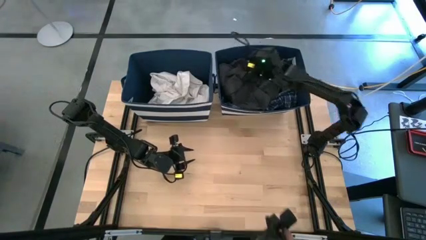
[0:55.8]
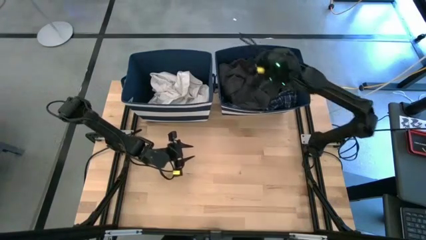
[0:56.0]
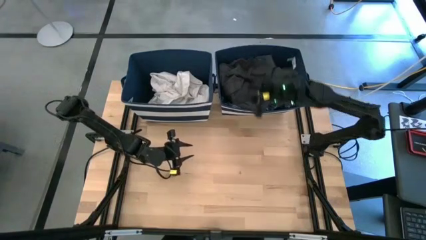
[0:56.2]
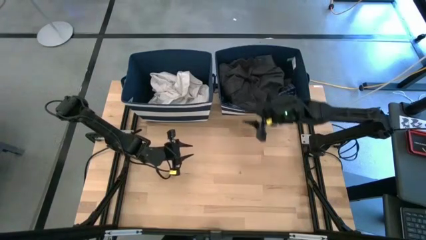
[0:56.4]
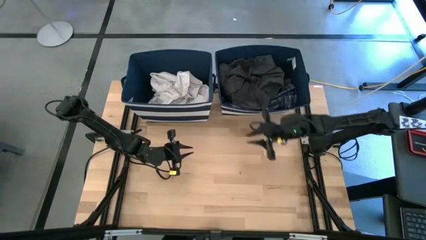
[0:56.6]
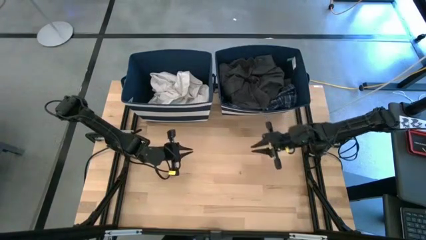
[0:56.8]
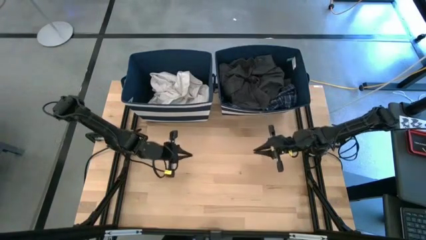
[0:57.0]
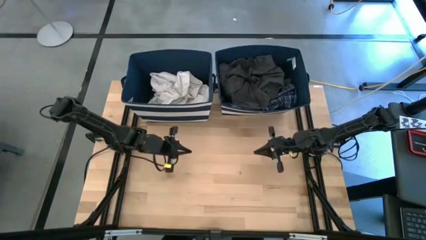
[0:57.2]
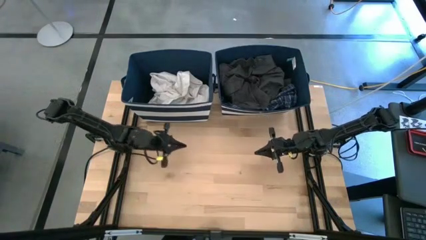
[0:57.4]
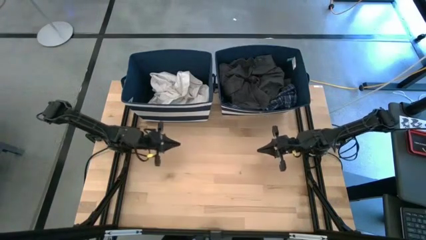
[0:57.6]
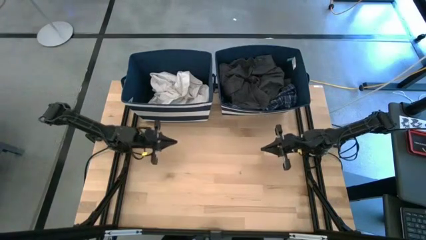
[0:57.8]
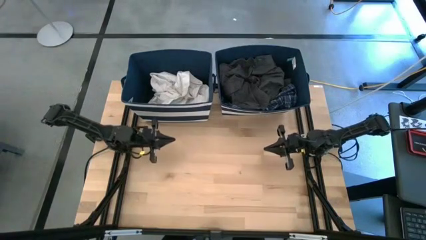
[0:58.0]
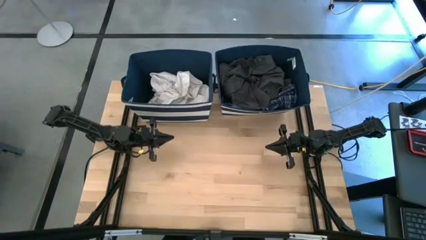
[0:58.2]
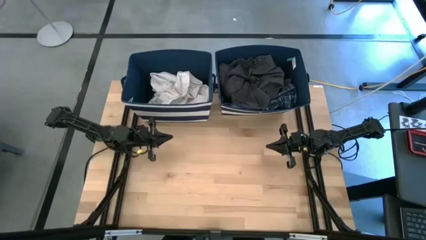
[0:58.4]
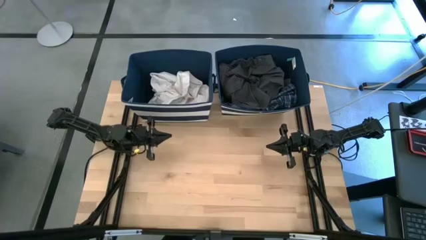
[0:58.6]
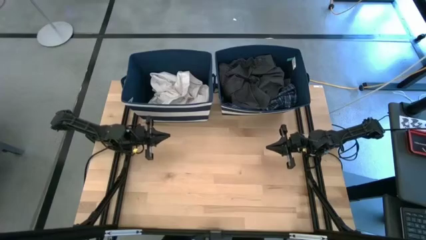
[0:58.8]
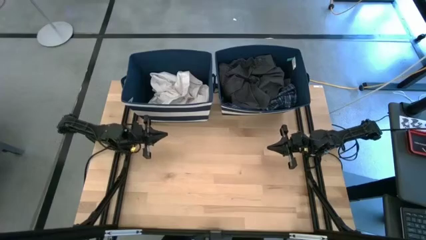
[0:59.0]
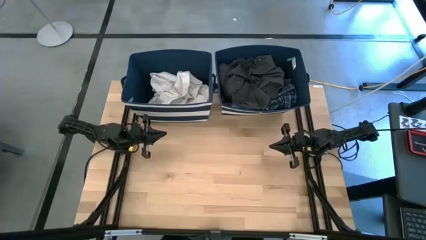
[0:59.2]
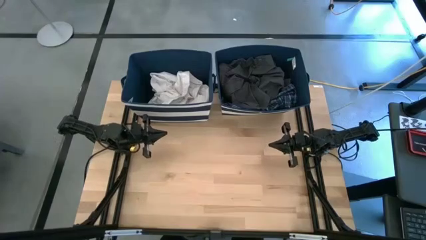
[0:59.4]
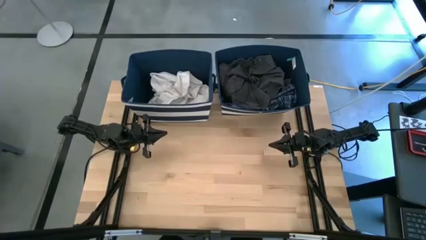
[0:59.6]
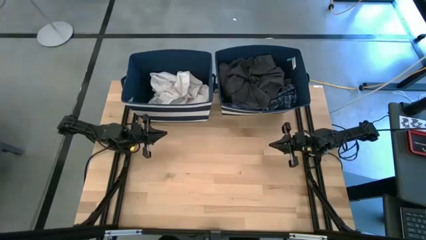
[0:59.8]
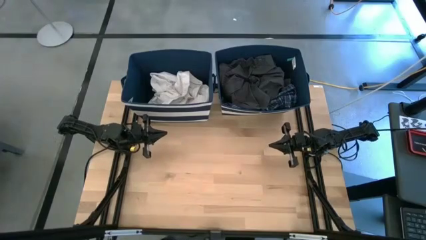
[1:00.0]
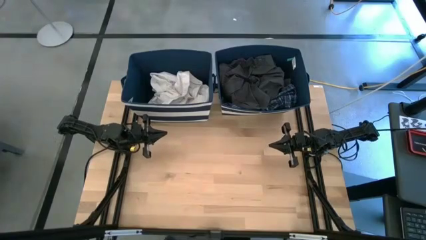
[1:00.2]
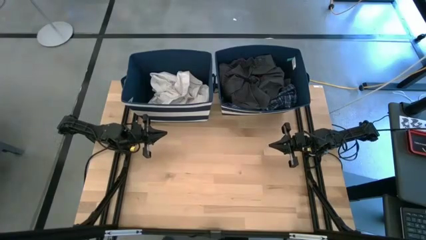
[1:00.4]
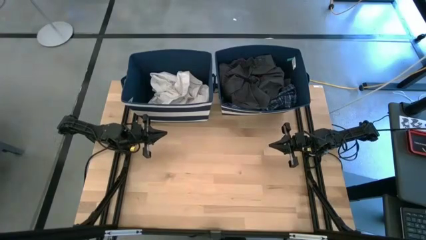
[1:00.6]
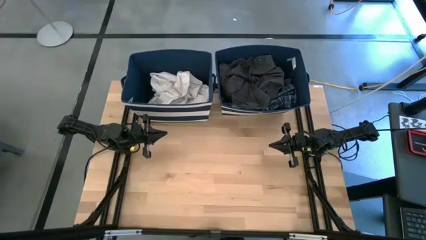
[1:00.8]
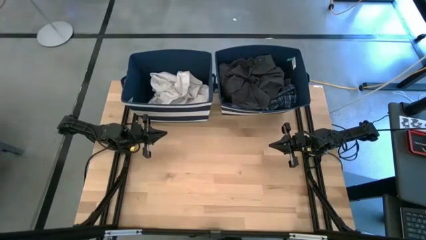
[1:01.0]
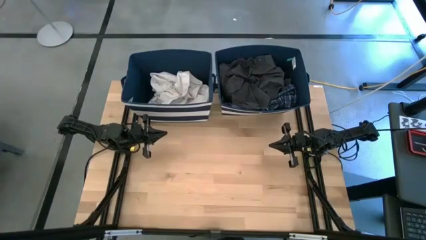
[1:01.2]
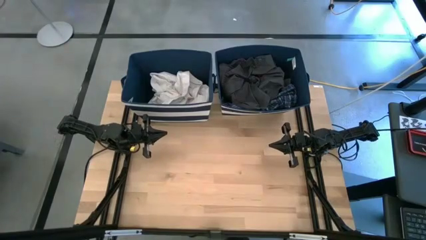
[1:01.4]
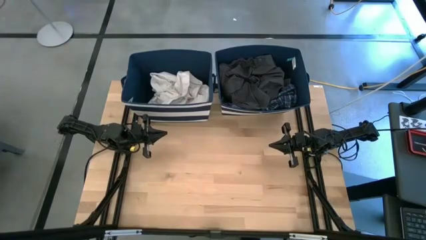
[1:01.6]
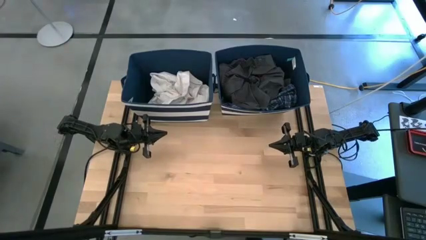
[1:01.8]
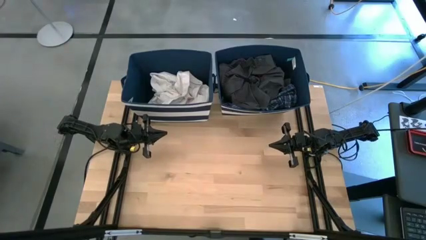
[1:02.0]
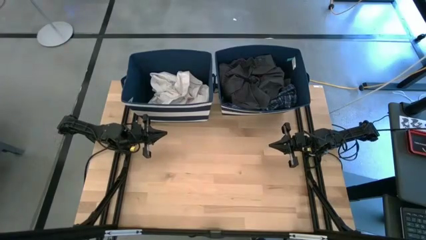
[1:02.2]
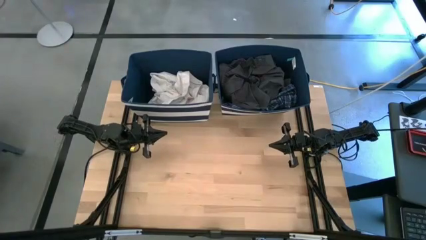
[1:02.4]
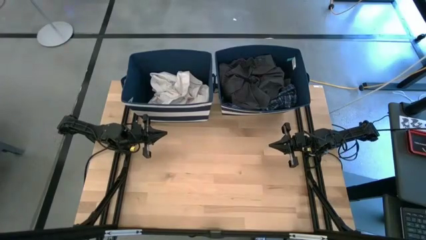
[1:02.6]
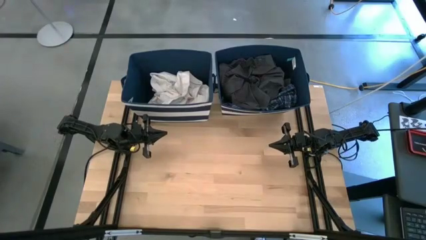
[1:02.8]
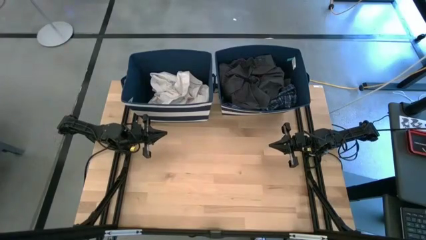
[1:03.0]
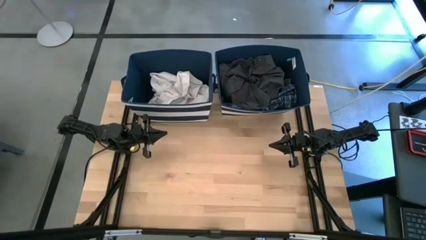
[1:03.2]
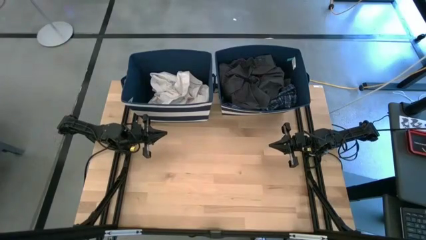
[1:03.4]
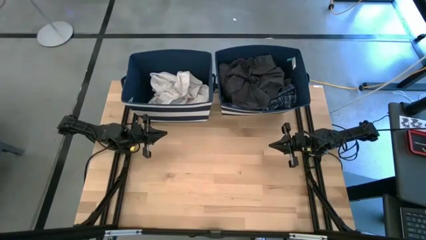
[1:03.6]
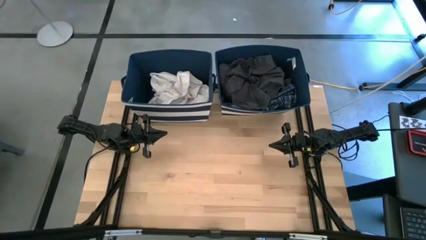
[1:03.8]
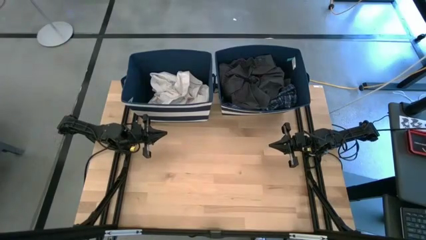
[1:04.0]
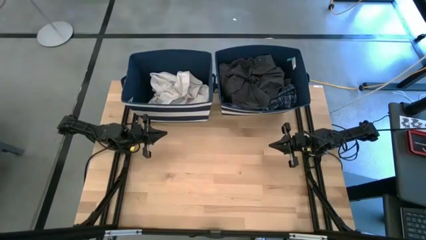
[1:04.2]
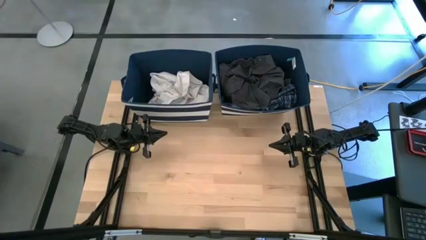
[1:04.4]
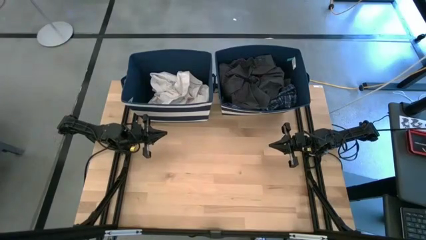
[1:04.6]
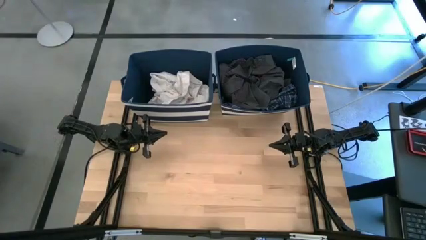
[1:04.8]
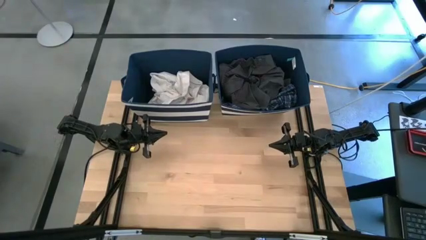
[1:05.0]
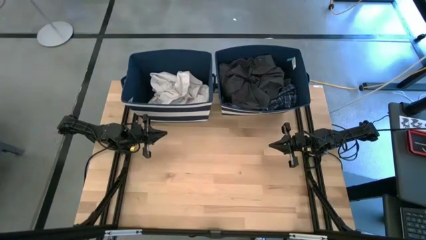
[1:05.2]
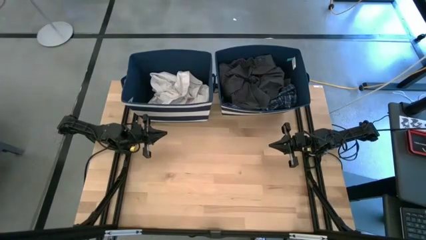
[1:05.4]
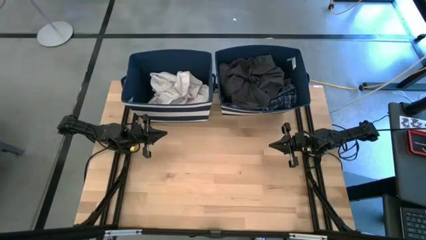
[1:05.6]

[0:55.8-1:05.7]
Task: Sort clothes
Return to Home Position
